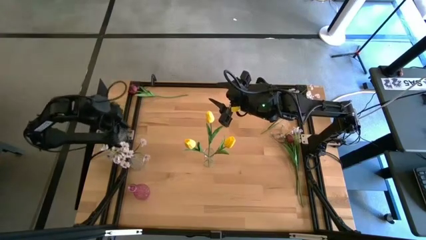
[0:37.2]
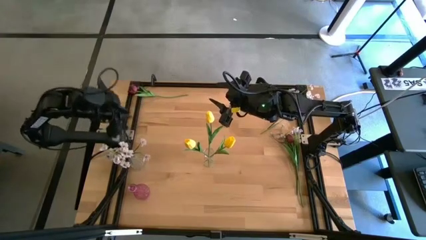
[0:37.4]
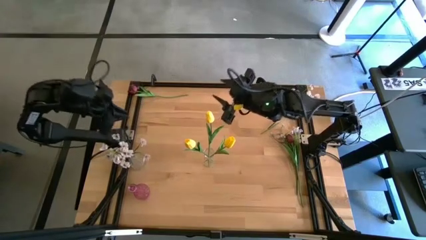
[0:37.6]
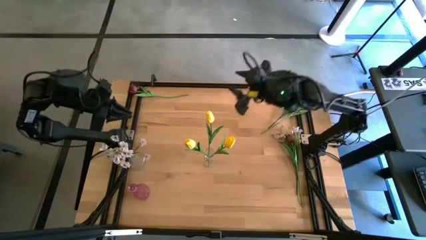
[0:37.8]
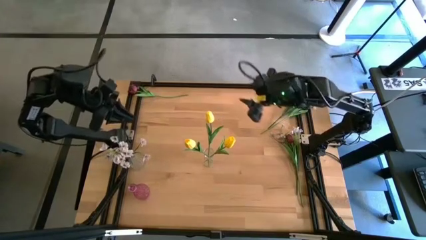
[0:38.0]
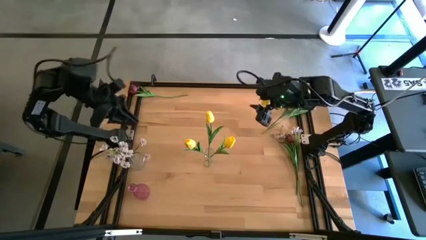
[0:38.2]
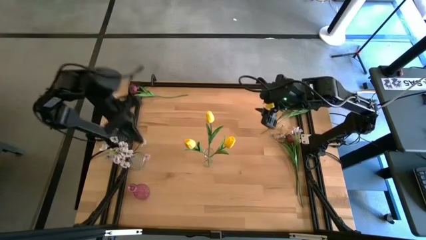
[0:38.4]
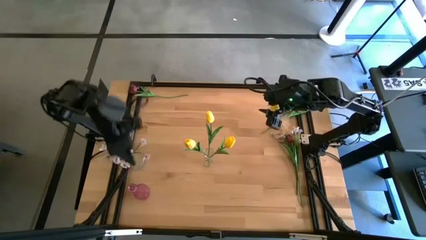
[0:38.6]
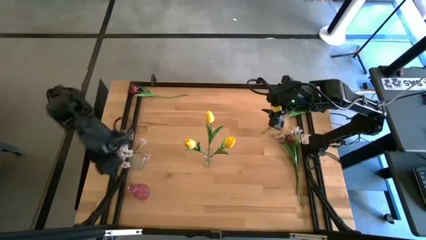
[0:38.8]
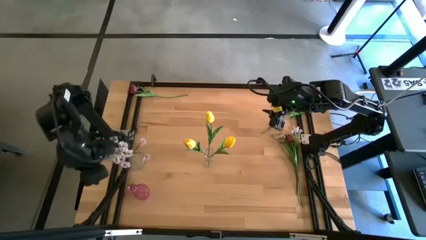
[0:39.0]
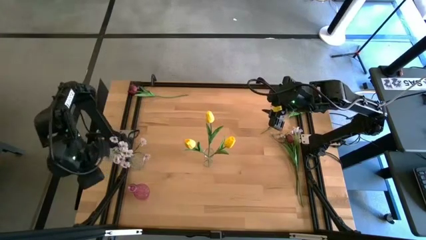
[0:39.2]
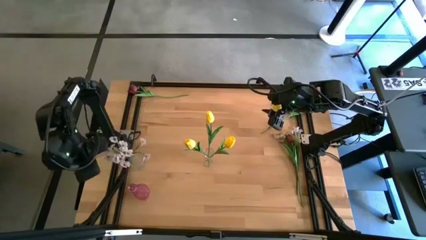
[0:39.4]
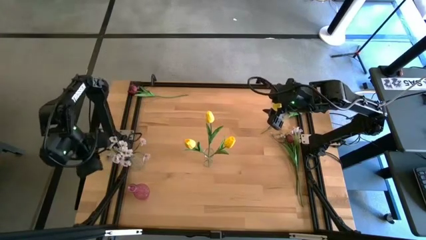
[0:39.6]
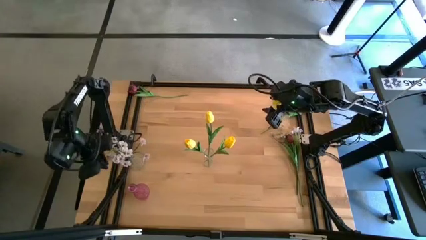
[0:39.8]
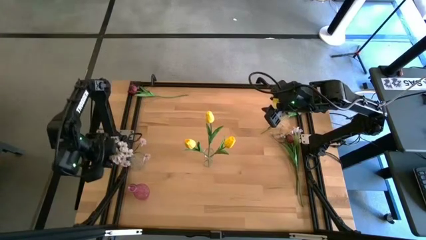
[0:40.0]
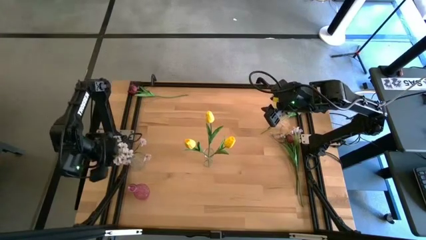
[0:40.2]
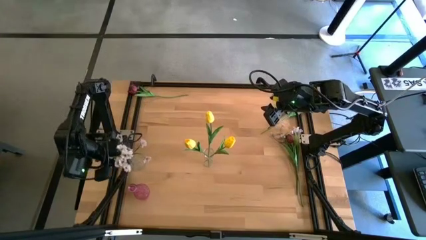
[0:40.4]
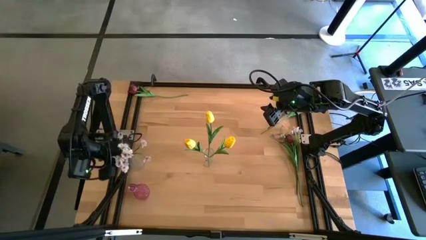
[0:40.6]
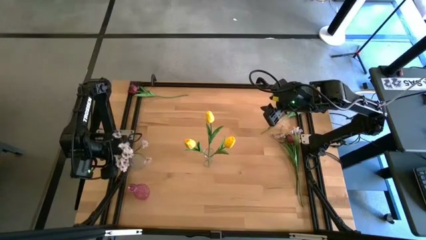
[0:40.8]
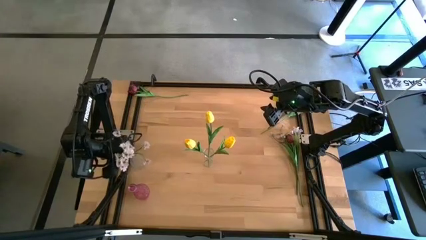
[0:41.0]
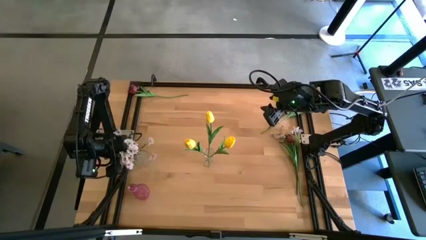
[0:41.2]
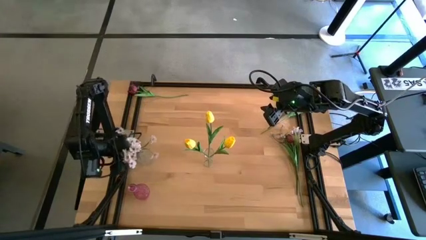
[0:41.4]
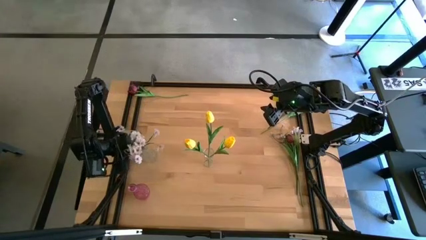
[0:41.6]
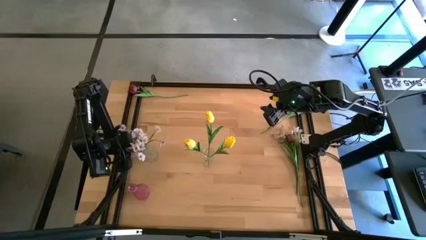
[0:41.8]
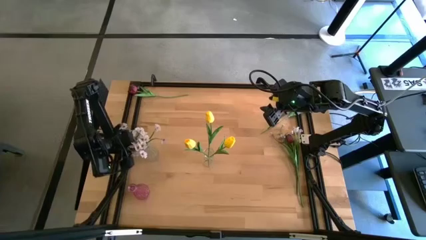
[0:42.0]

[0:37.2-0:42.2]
Task: Sort flowers into vase by color
Adjust the left transparent vase

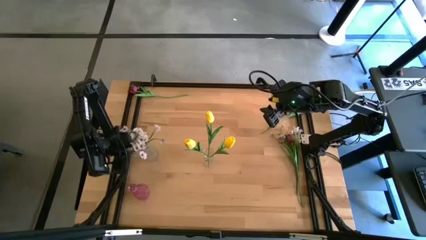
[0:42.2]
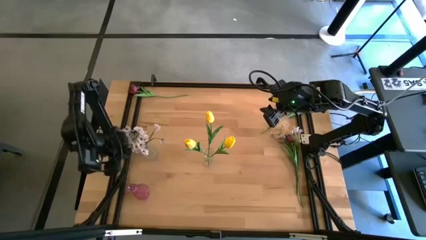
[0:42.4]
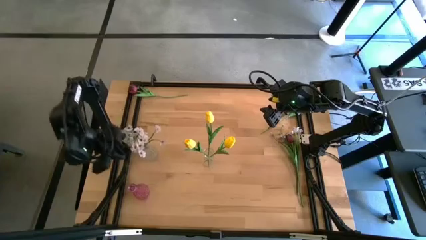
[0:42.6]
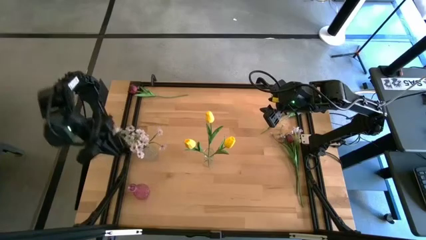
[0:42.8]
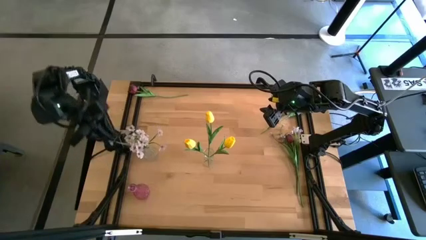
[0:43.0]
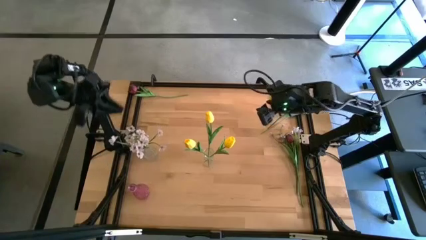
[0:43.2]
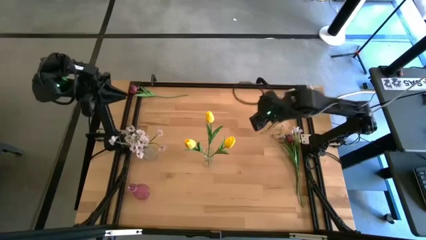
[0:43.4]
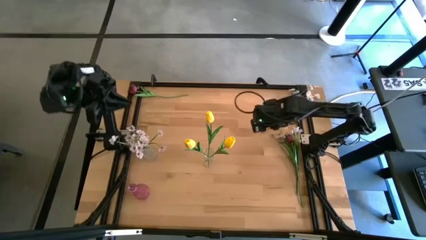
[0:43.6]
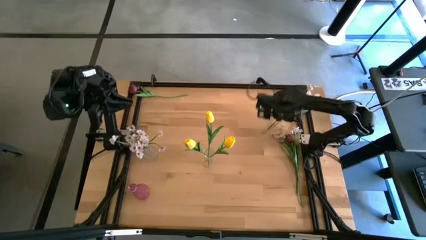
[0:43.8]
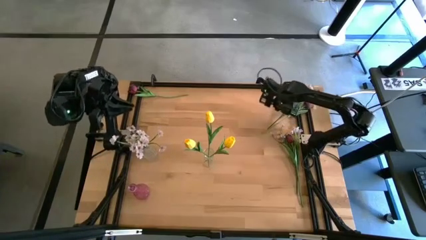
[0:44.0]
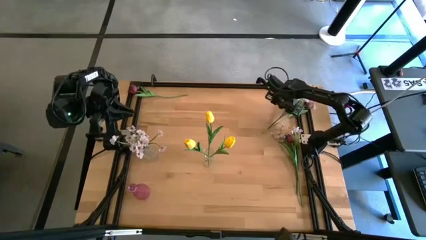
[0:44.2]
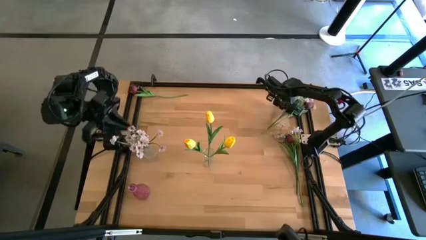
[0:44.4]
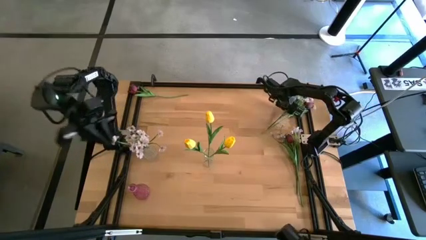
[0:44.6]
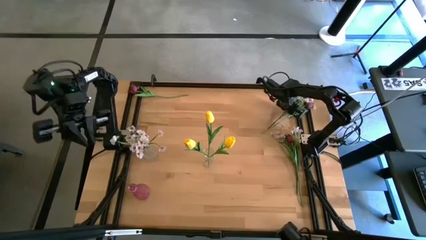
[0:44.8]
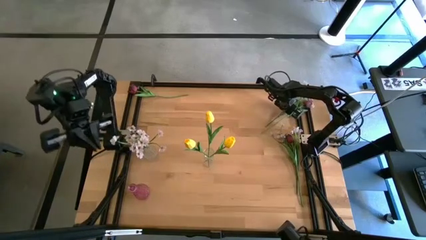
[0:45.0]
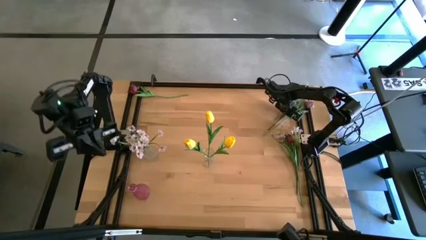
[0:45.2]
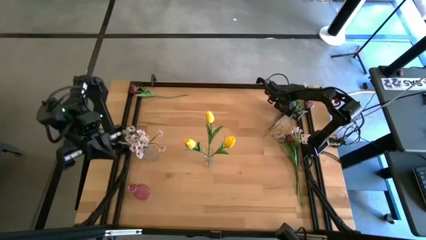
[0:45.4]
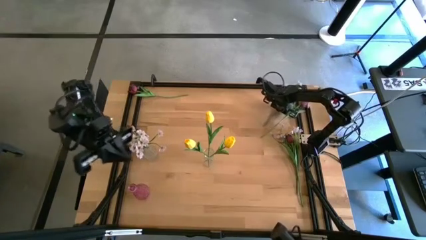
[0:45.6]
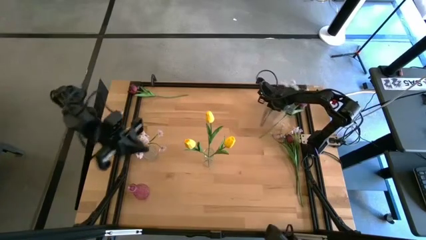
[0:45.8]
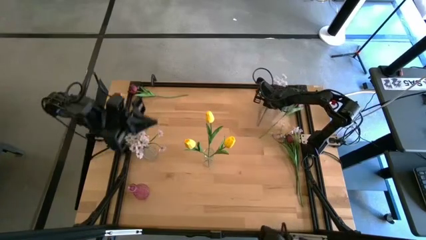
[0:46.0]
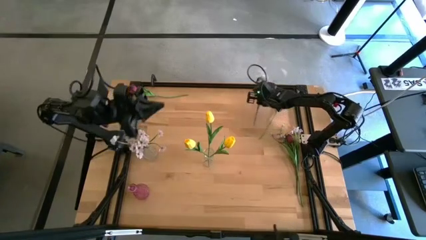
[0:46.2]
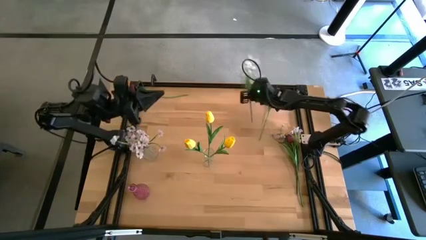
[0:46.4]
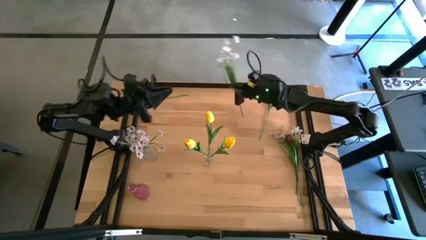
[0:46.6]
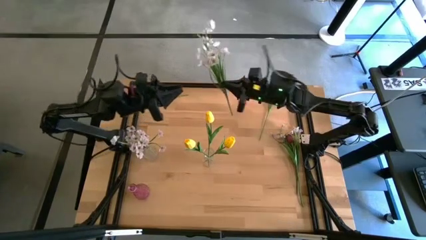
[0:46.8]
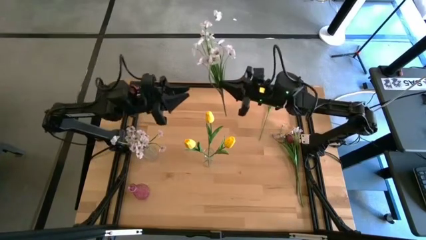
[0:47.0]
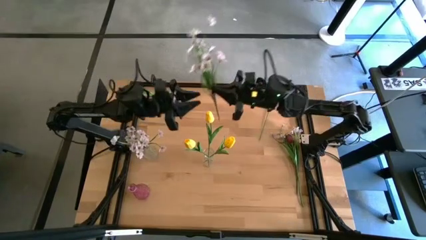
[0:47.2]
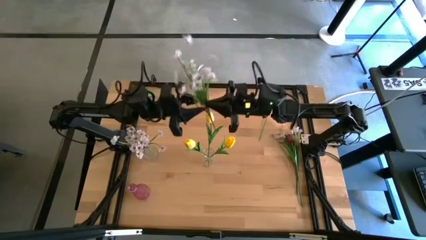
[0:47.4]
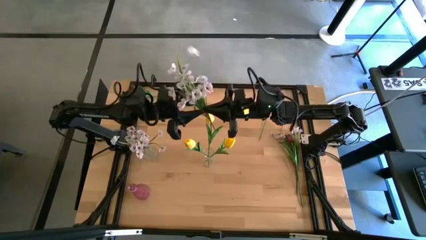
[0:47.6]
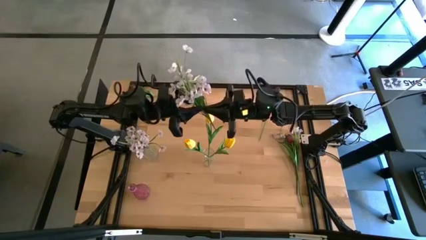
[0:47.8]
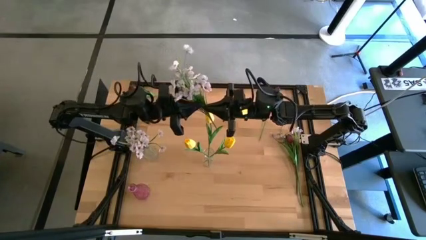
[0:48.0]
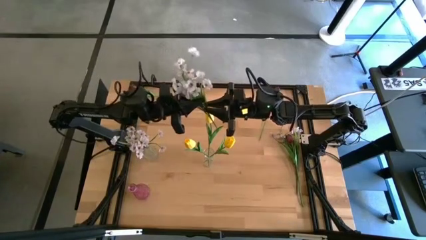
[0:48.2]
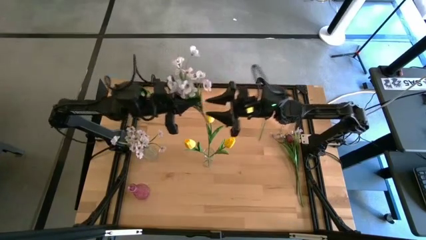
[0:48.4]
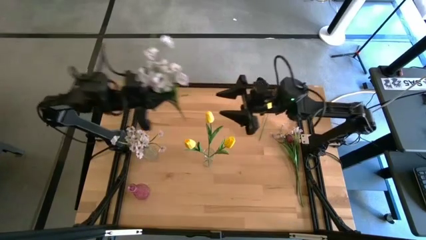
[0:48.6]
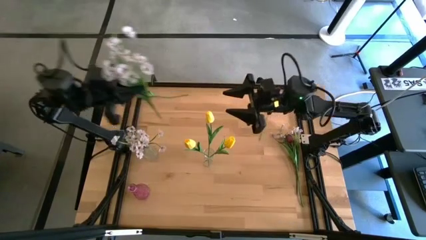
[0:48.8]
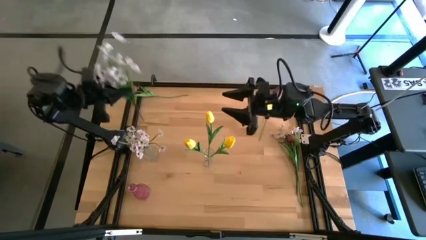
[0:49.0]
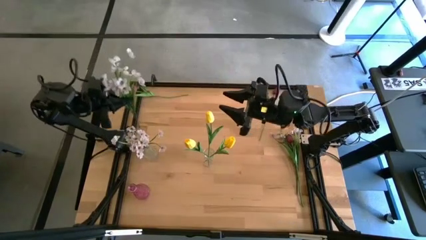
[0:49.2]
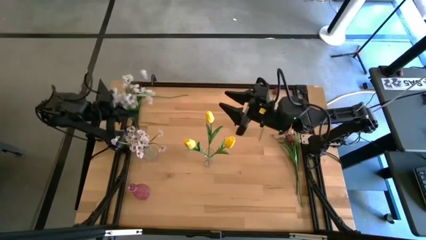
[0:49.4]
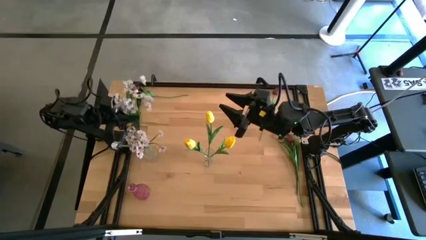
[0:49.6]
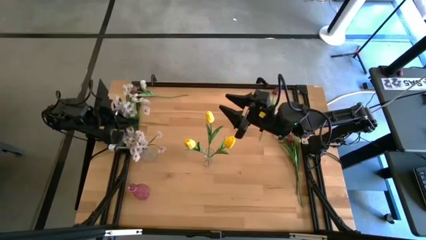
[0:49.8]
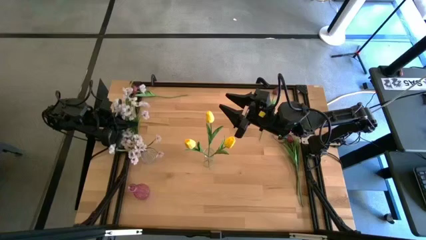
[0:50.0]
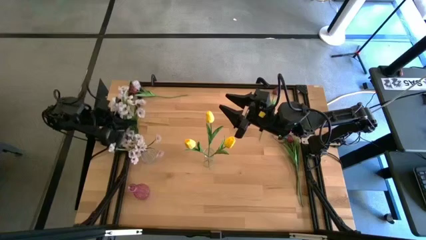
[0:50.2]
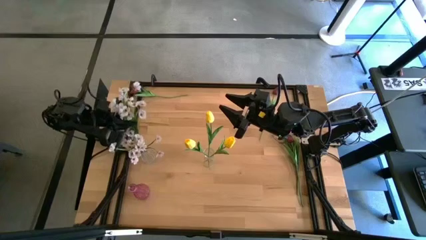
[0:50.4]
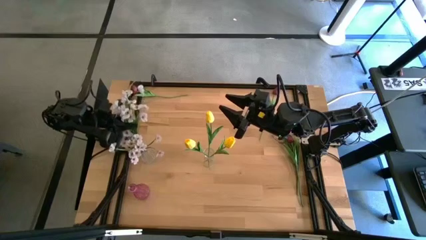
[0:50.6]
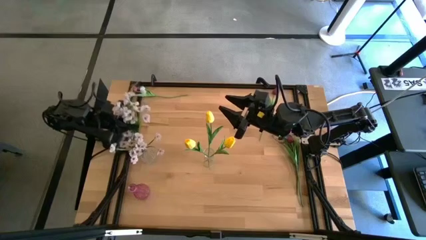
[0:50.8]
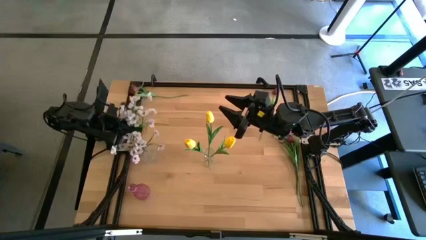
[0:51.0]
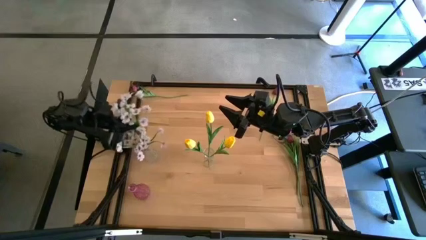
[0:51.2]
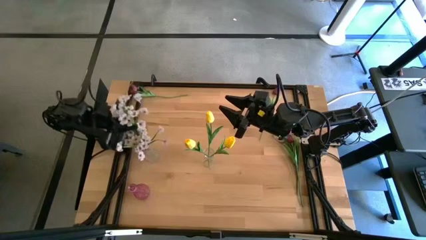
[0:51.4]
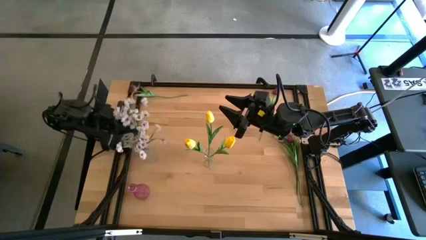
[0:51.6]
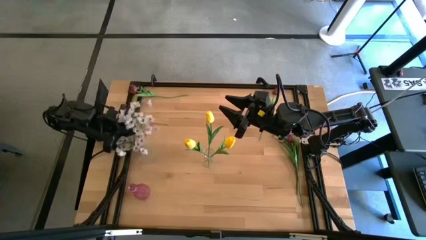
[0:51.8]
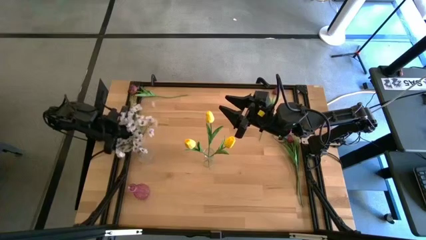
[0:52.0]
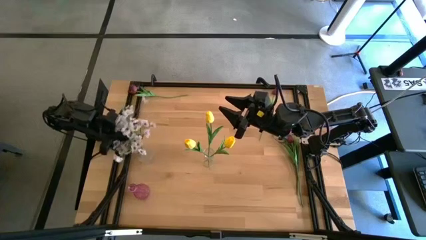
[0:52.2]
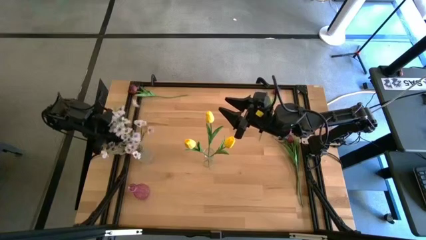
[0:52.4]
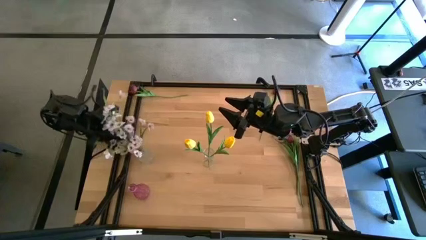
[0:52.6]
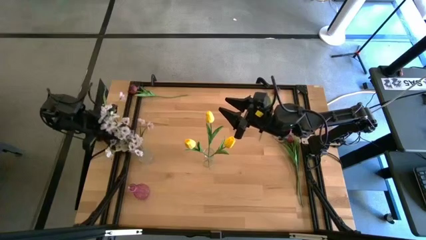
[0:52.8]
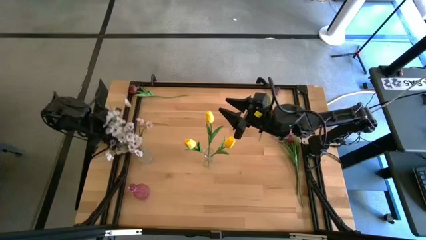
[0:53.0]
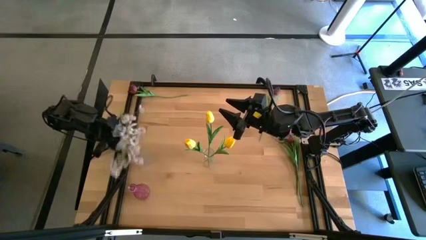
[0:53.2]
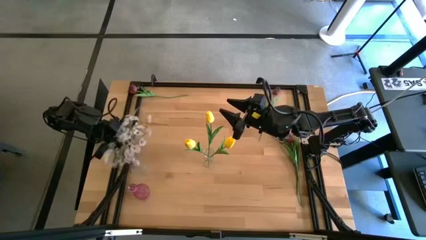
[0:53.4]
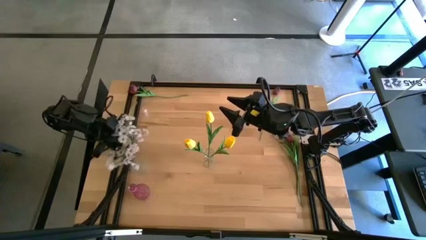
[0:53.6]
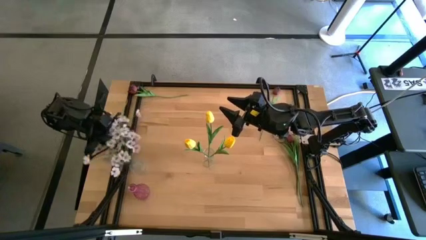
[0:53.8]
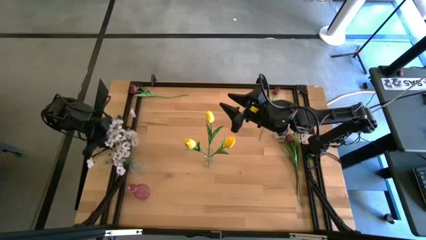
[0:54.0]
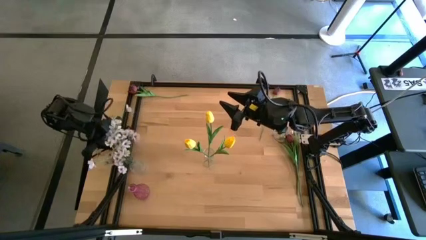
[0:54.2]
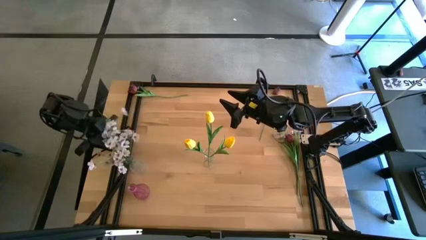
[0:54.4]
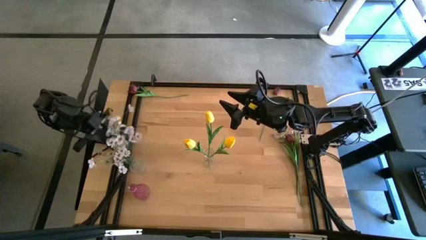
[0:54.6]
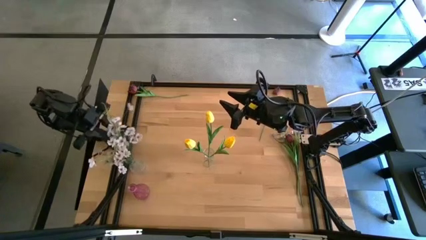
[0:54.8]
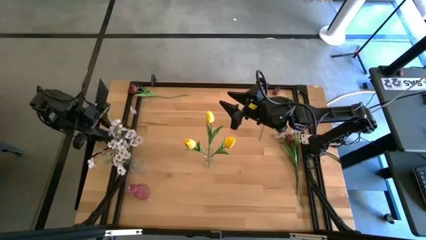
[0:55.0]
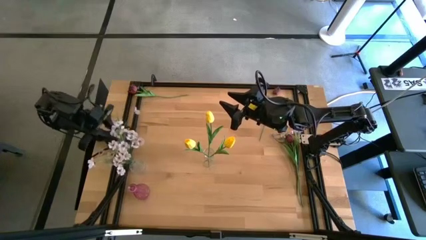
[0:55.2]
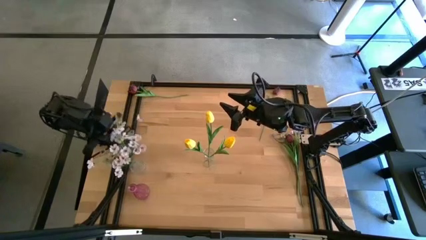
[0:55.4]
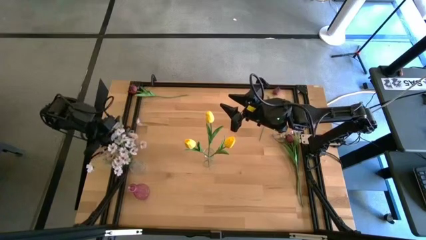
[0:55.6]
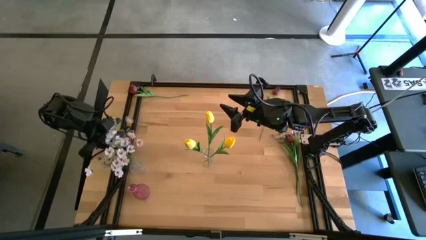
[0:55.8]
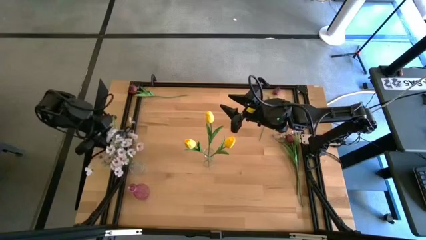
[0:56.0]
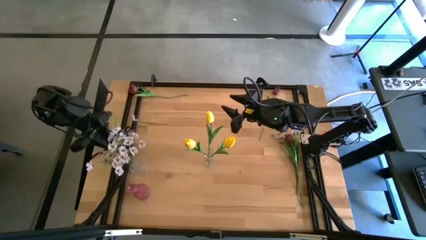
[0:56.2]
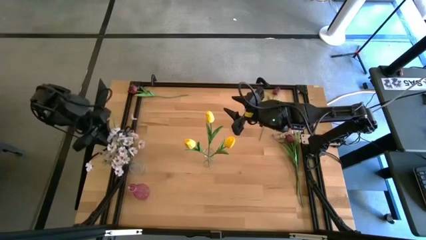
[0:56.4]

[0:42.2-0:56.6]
Put the top white flowers into the left transparent vase
